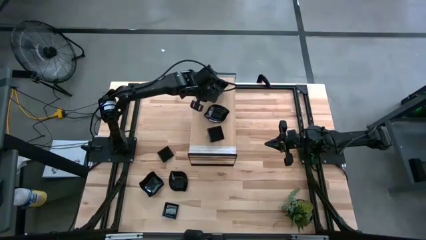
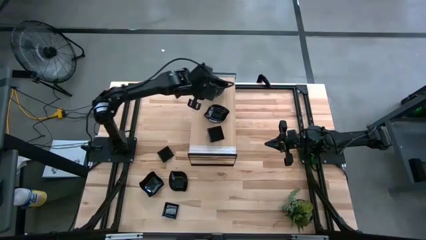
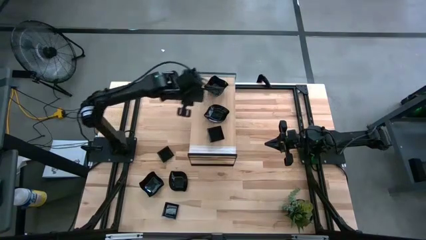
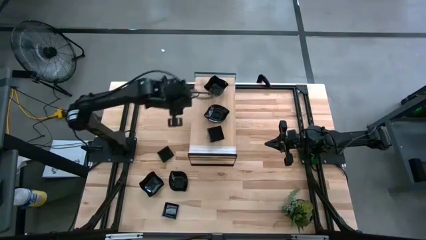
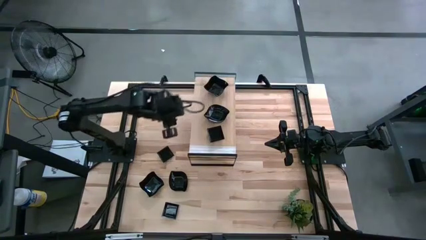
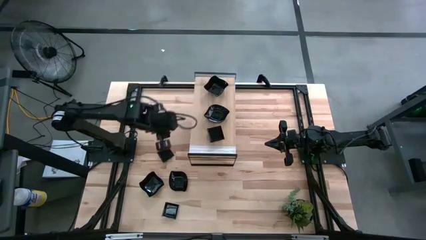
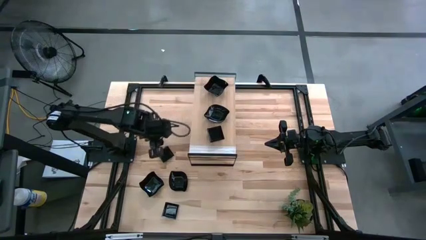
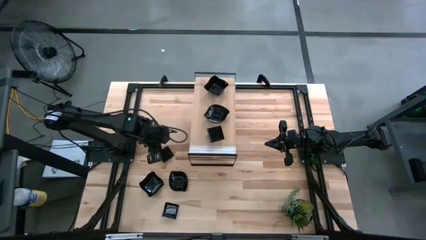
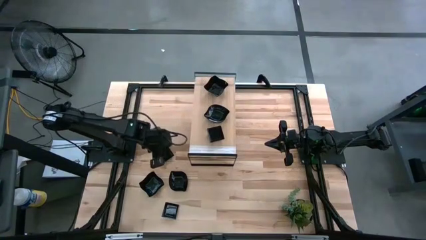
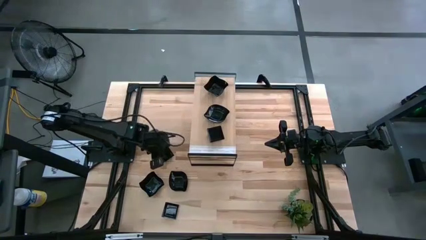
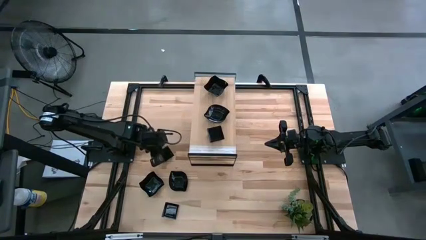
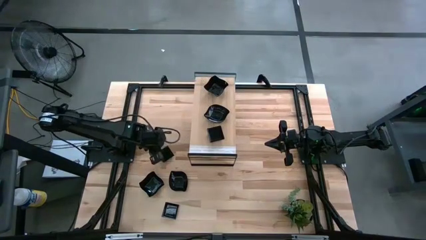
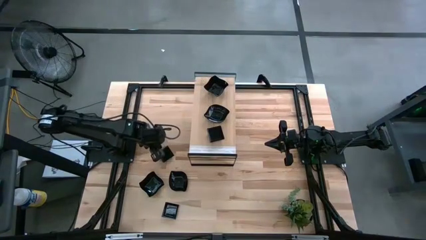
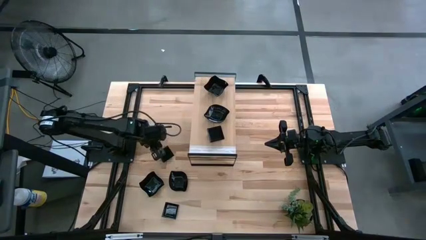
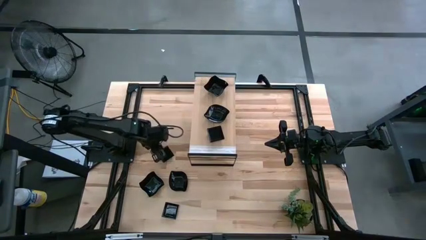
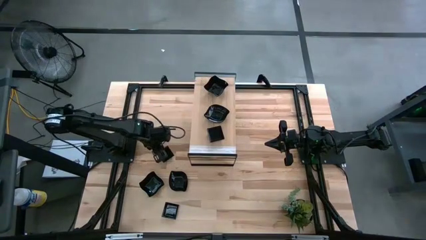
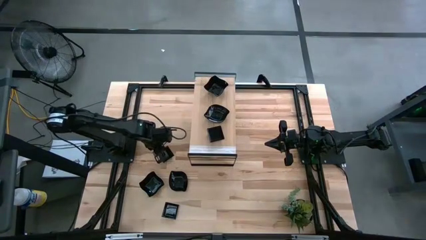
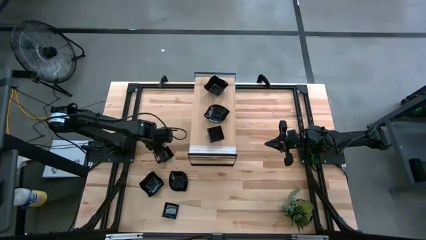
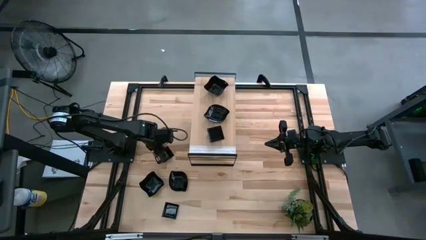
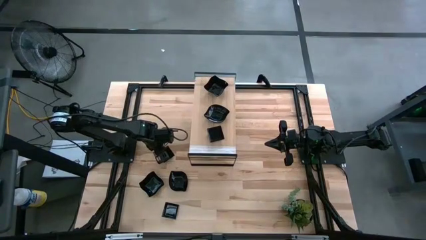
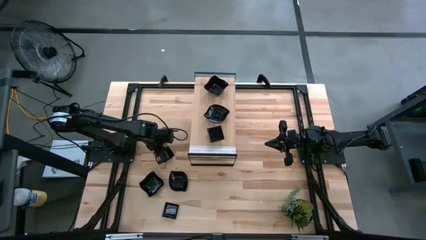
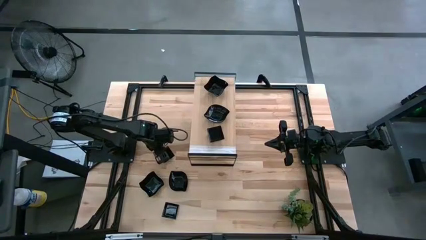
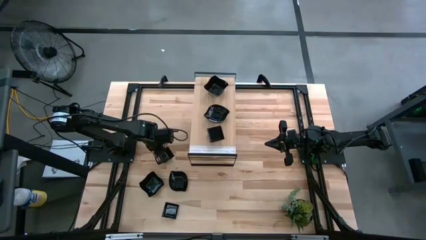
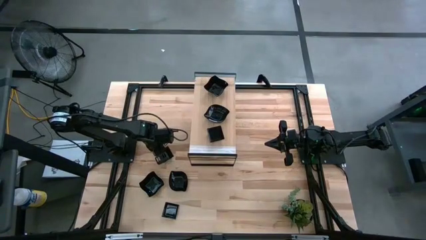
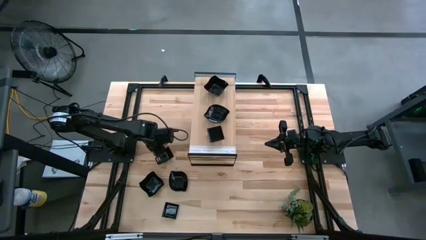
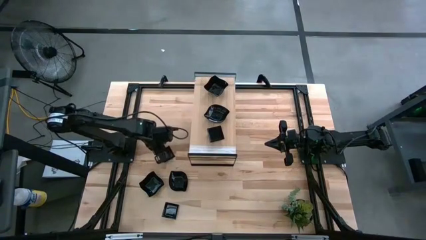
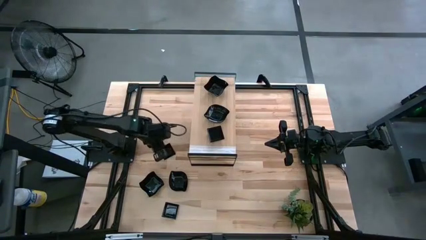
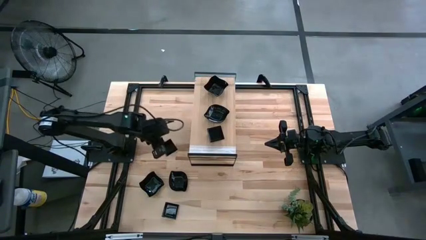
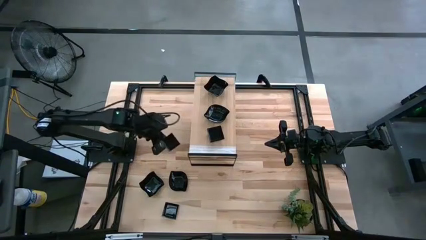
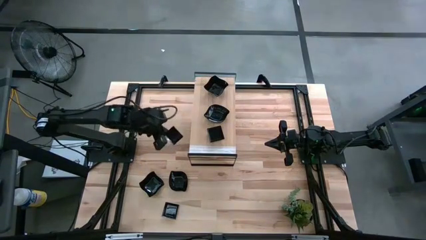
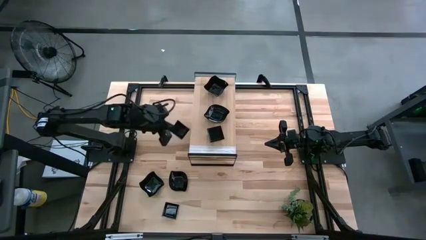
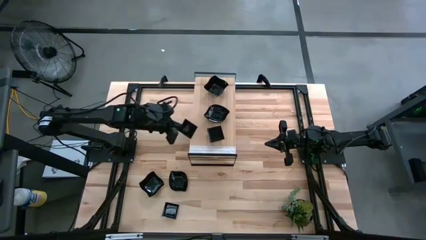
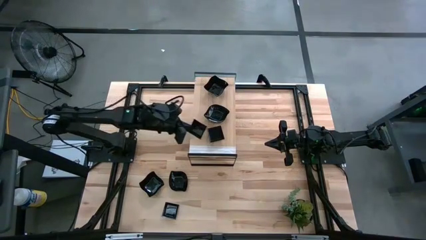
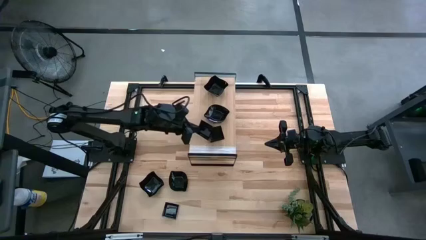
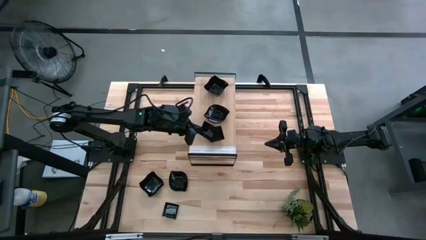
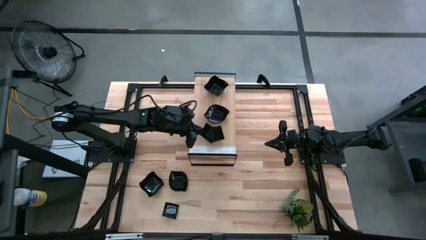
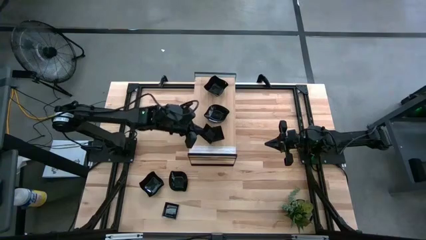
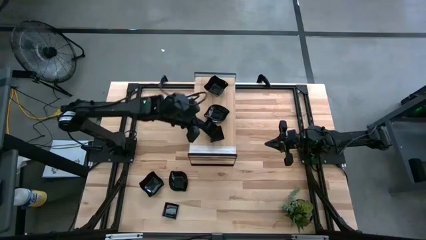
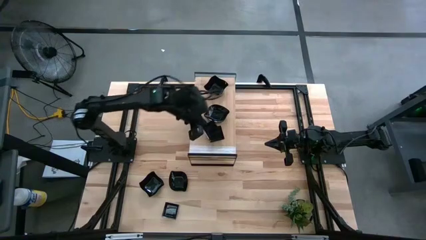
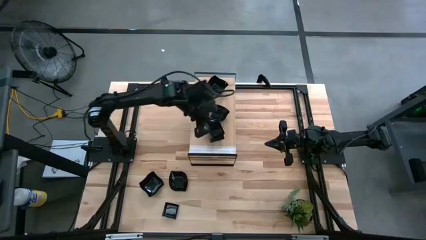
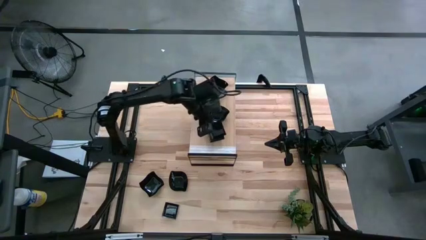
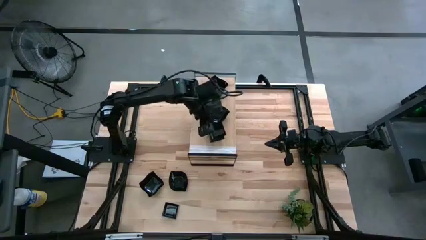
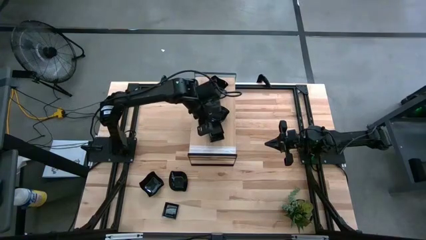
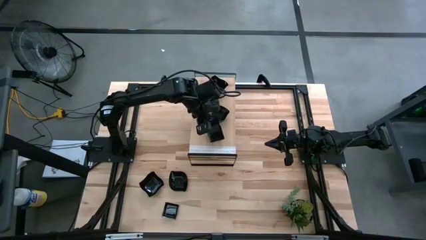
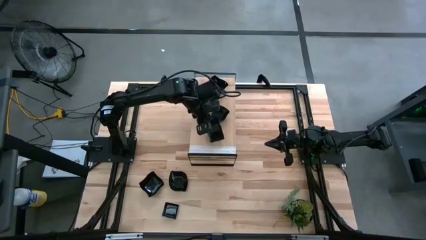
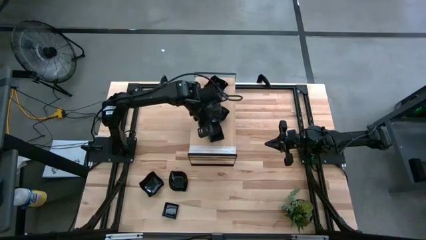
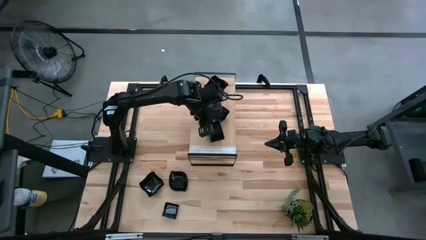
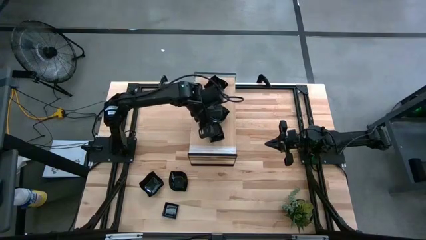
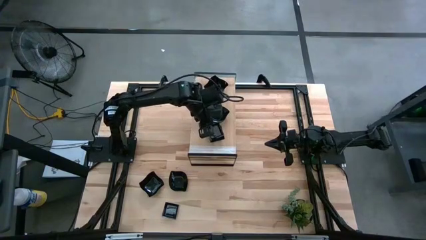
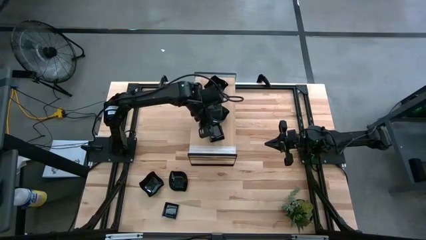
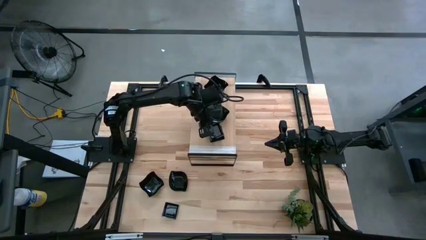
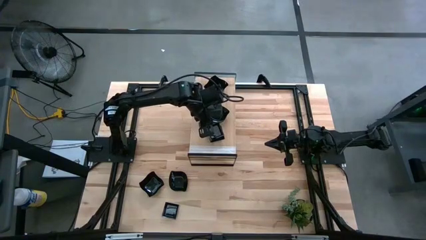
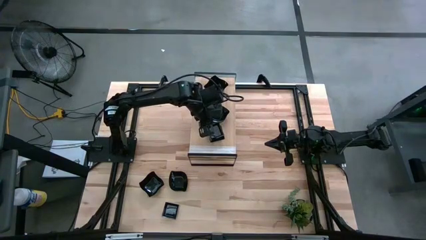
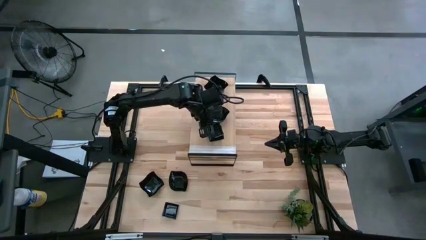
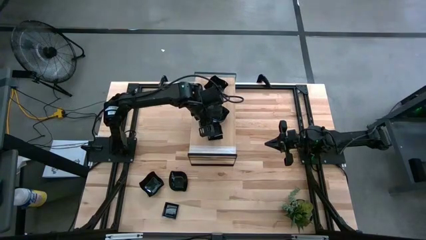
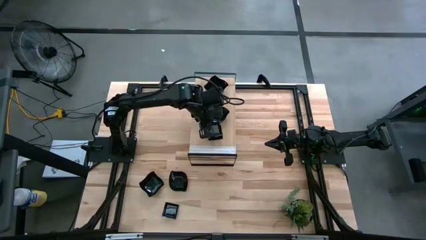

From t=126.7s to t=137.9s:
Task: Pick & Place Mini shaped plates
Stack the square-shaped plate on top of the stacked square-shaped plates on the shelf

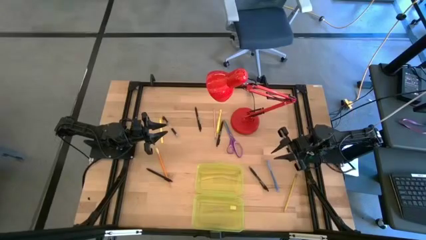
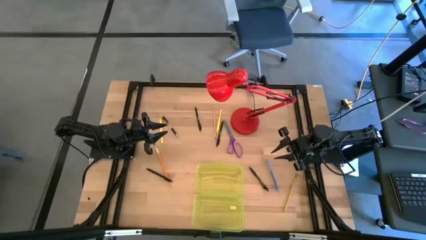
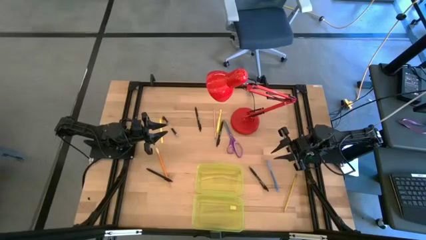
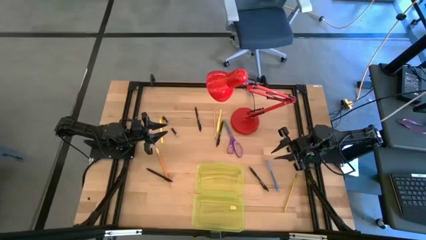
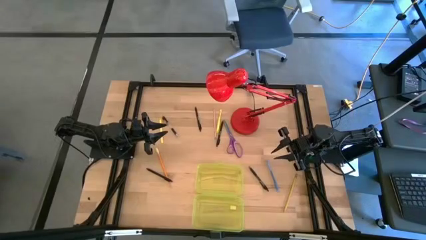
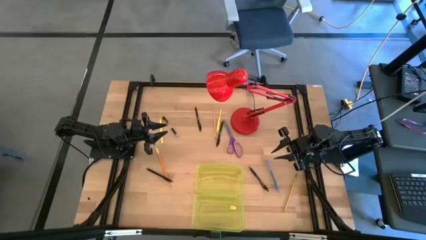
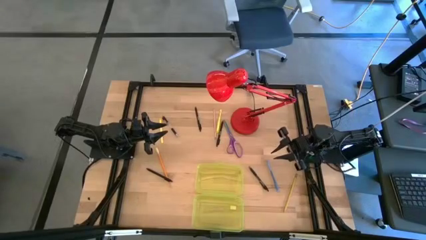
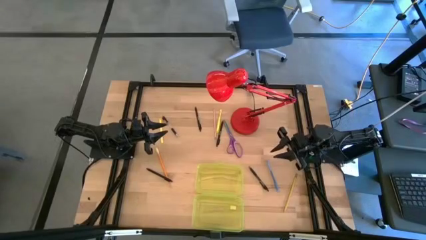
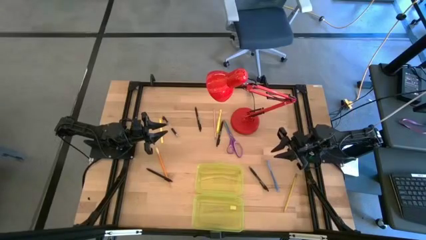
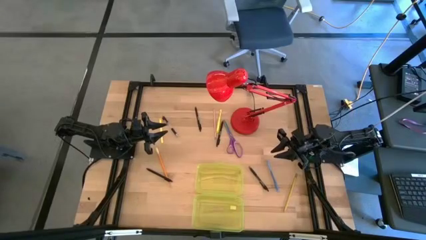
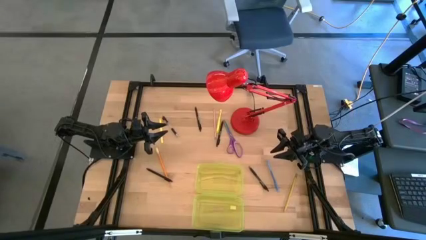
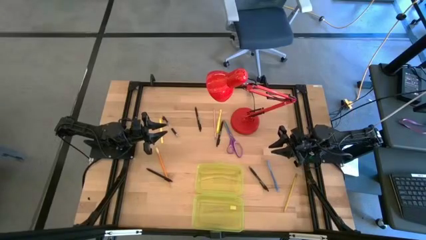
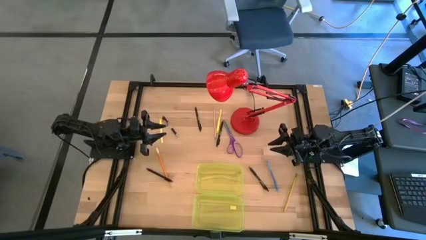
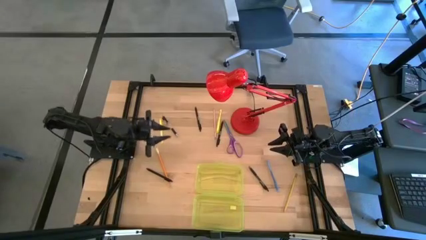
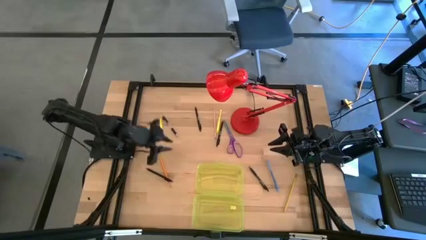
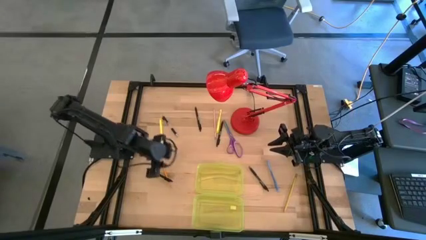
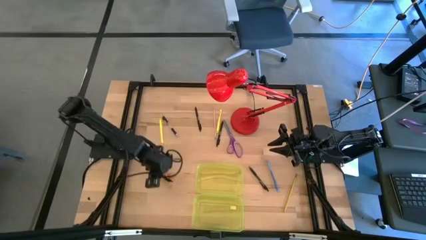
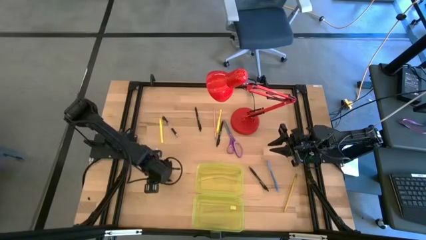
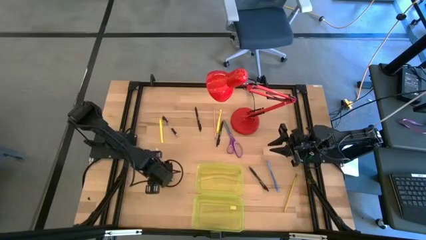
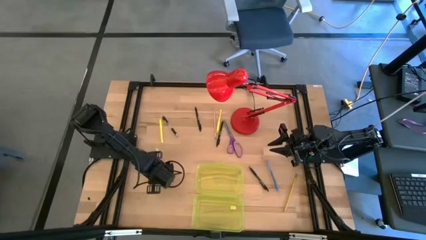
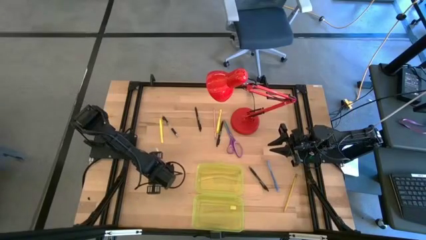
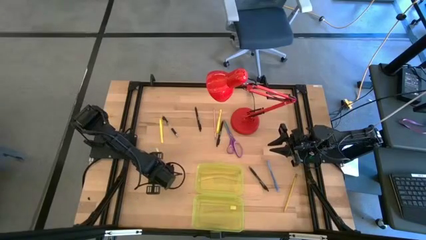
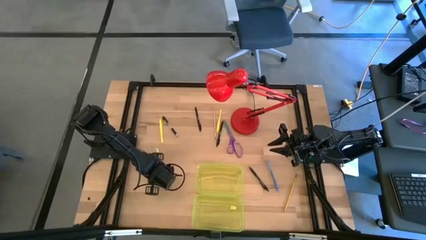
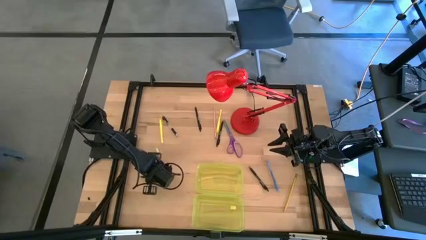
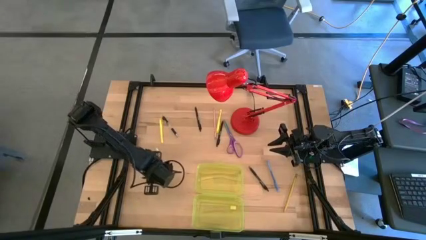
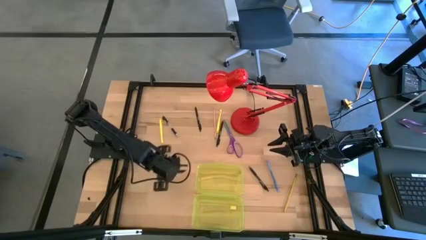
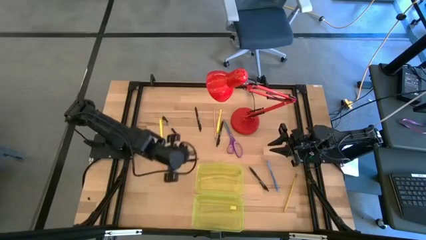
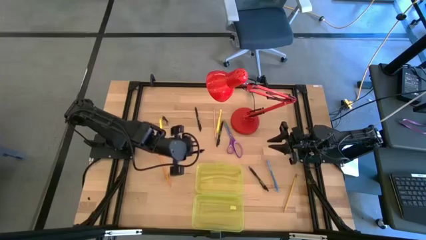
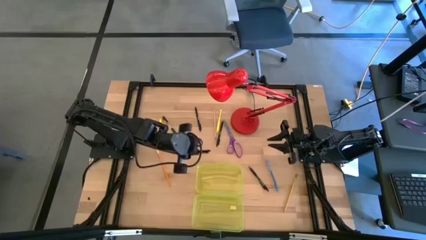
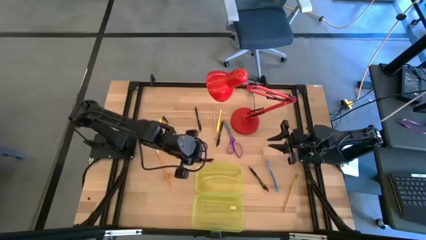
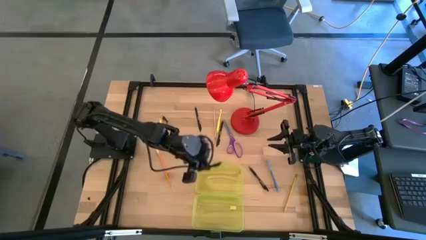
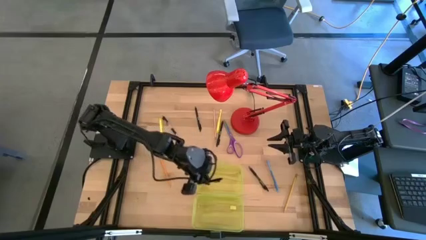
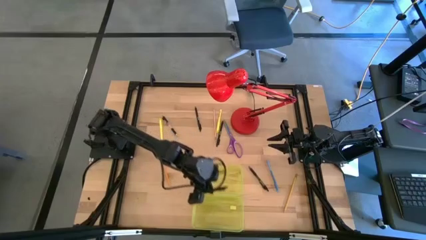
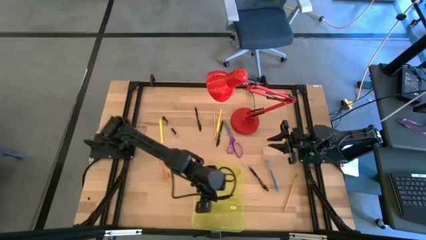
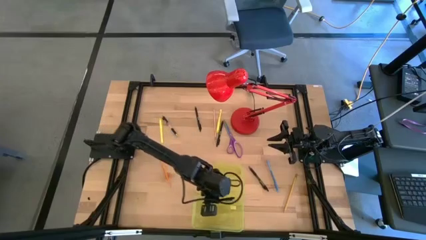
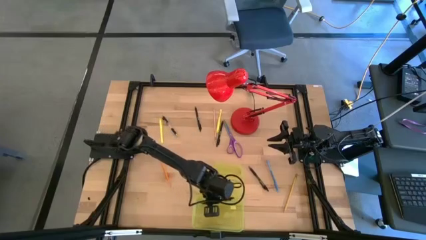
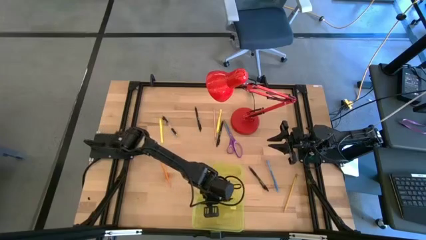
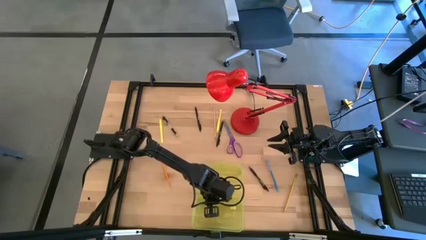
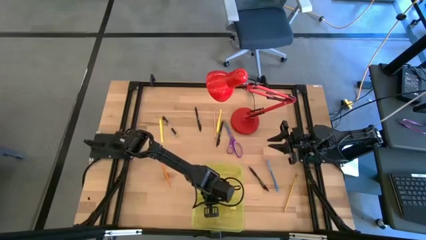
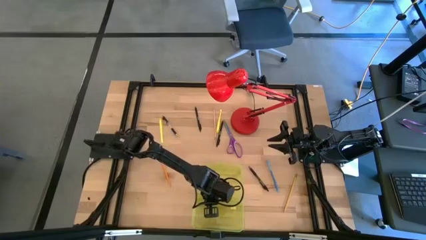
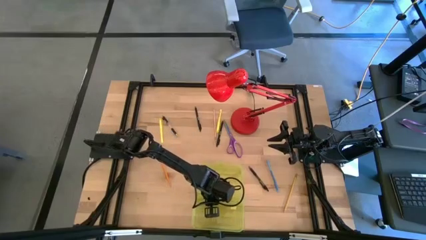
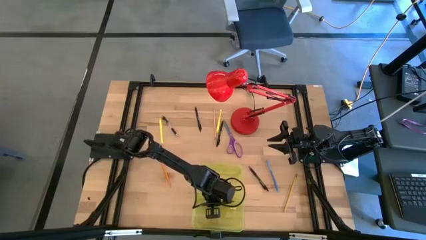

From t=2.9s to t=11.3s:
Task: Pick & place school supplies into a supply box
Put the black pen into the yellow supply box
